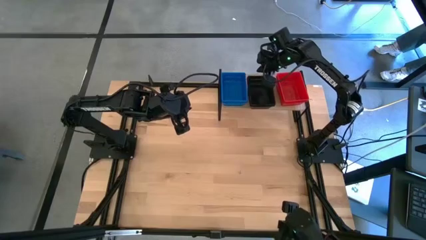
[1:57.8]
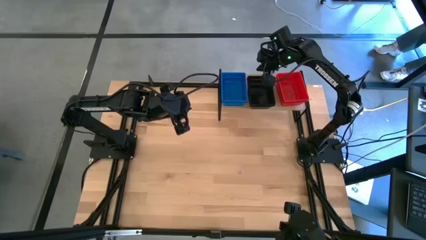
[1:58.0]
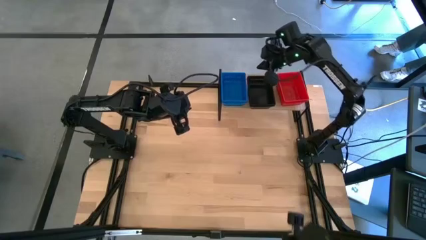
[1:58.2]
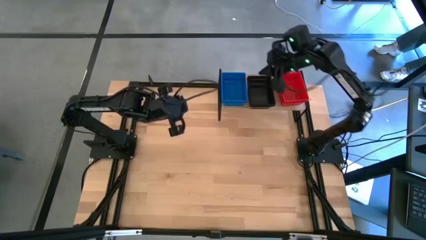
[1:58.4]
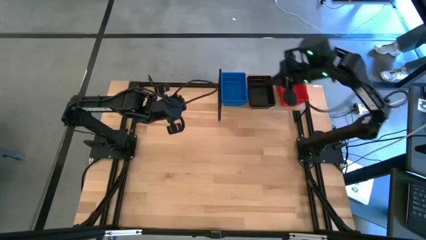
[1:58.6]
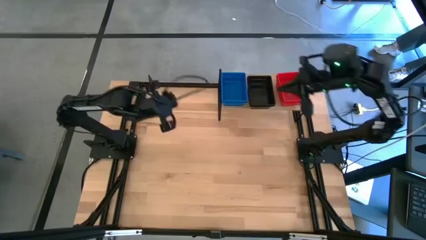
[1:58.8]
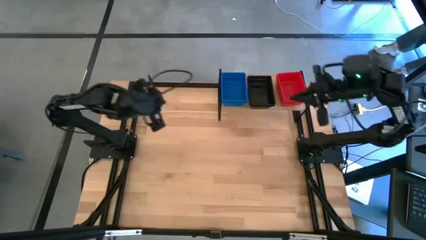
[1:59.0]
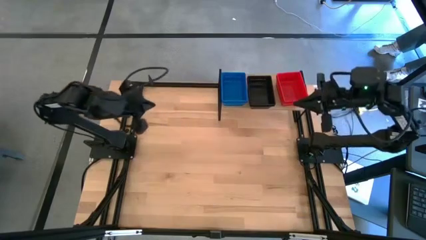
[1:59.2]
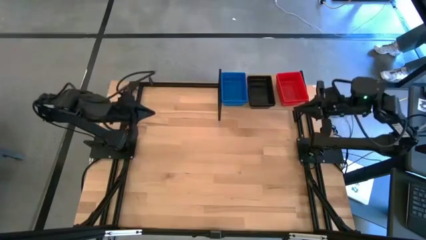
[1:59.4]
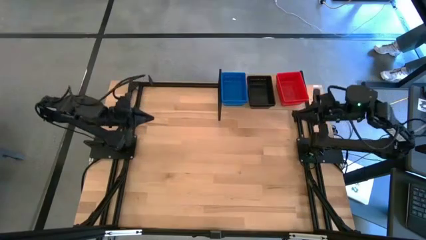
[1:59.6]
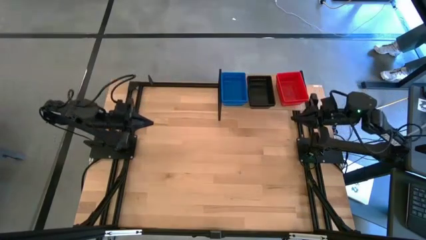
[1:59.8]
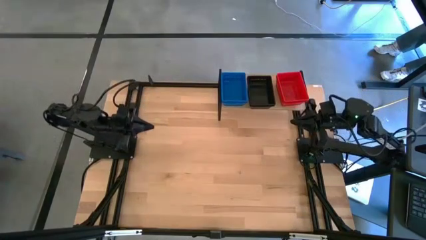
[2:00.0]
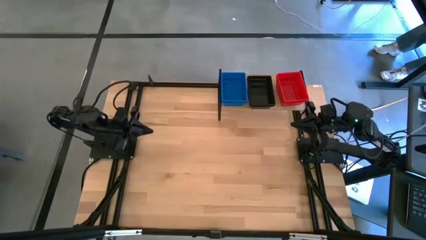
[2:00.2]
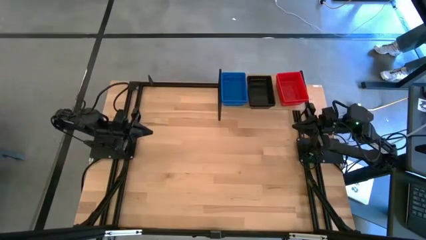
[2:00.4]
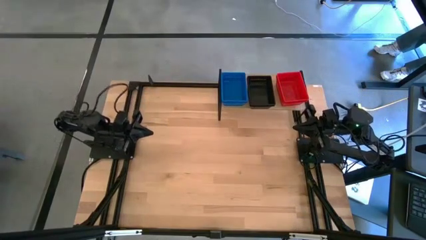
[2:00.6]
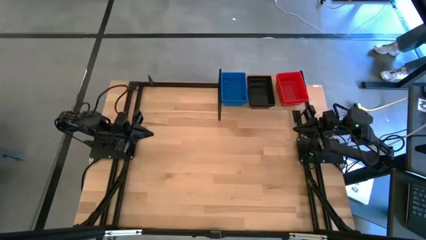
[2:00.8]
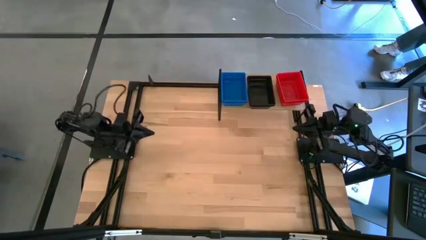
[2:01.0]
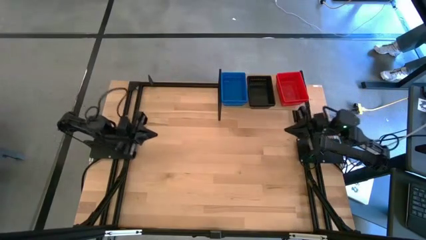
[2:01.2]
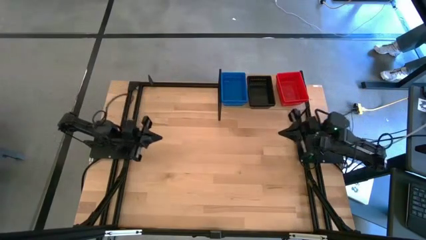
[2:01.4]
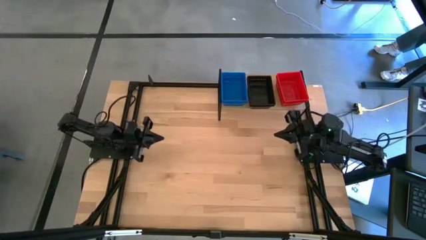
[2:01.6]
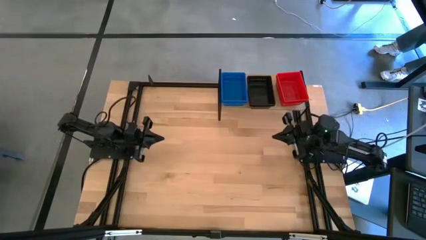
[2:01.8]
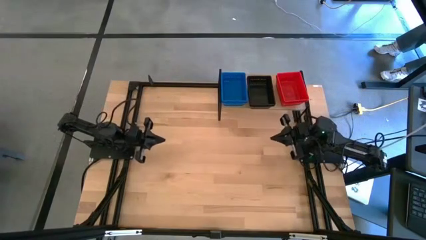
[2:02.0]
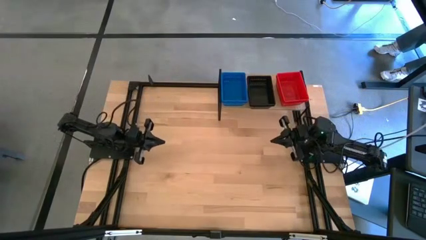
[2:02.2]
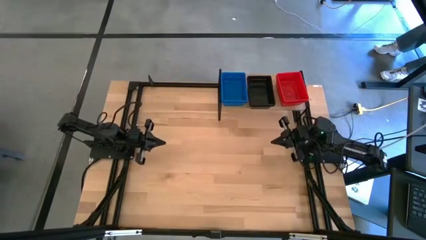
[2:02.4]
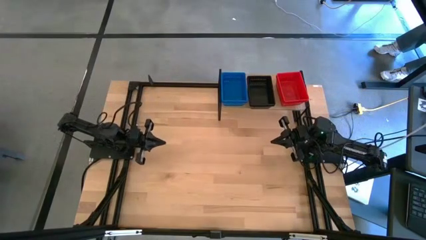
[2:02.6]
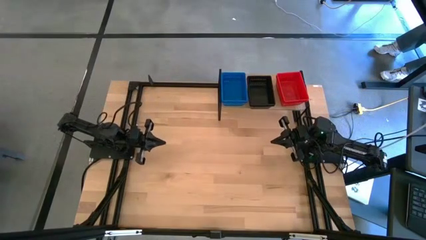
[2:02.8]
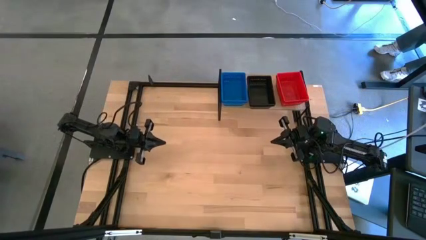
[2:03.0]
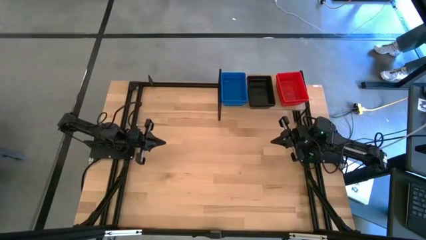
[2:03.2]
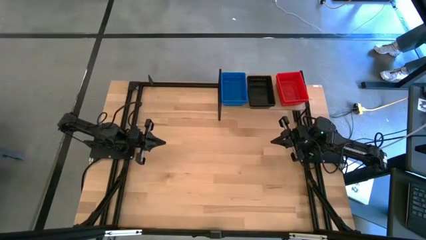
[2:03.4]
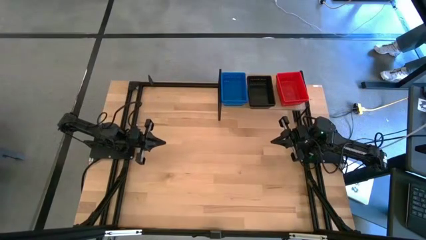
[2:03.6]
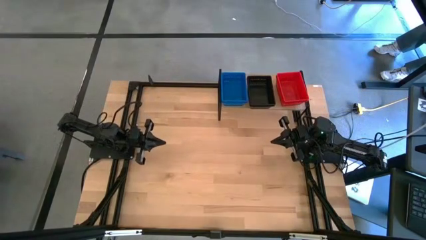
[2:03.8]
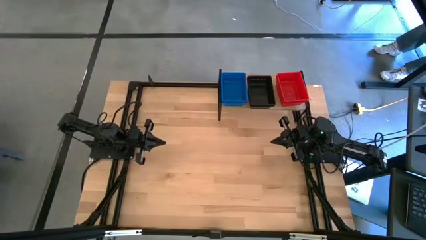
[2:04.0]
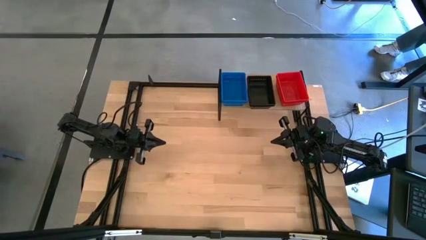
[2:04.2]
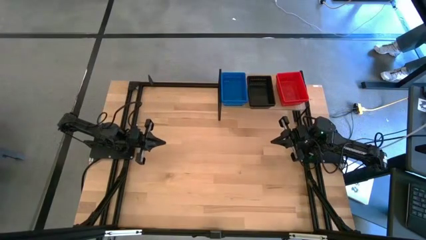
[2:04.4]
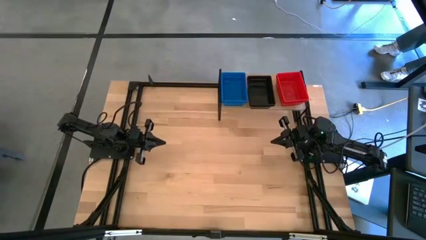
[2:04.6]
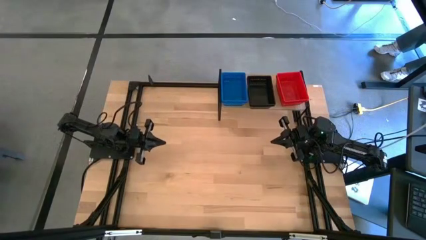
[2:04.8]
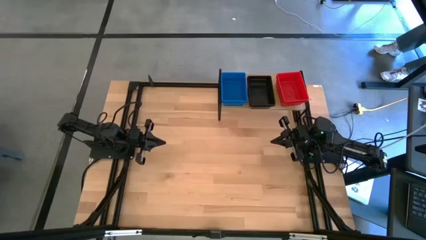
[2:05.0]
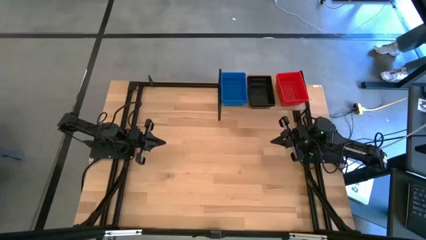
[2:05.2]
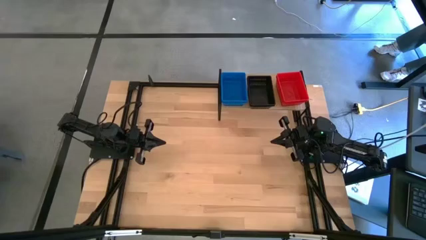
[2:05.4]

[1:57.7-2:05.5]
Task: Stack baskets on shelf by color
Return to Home Position

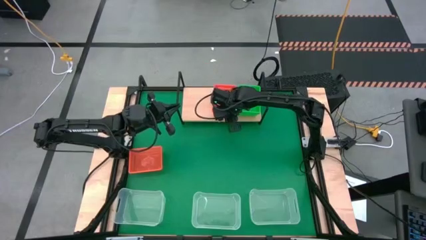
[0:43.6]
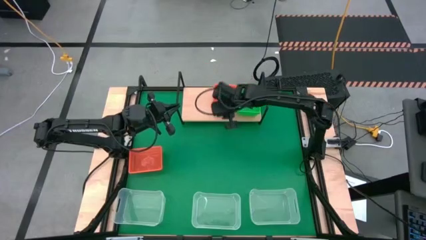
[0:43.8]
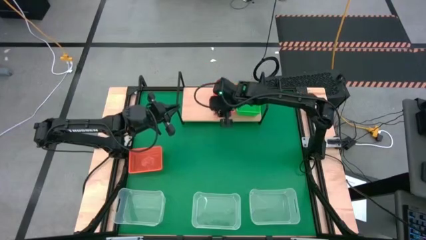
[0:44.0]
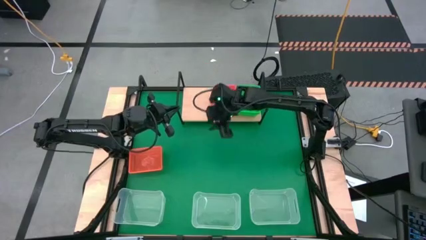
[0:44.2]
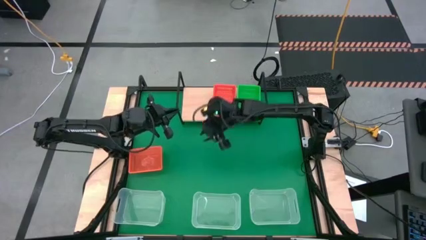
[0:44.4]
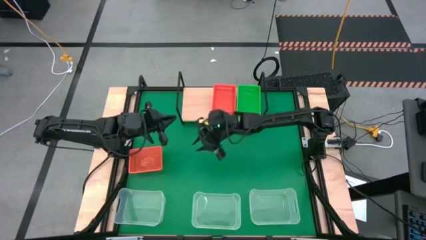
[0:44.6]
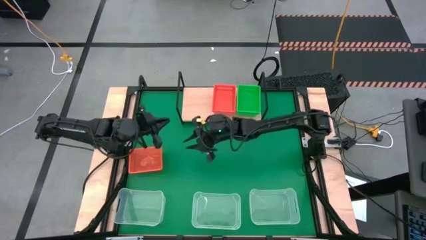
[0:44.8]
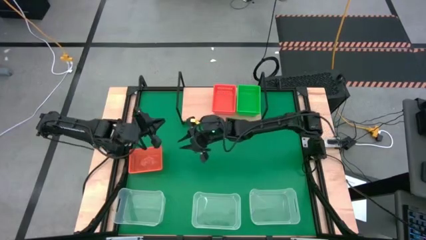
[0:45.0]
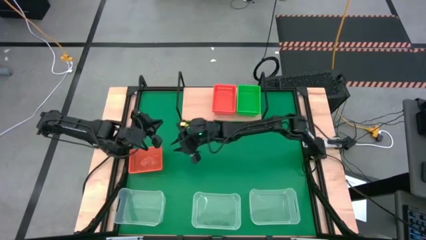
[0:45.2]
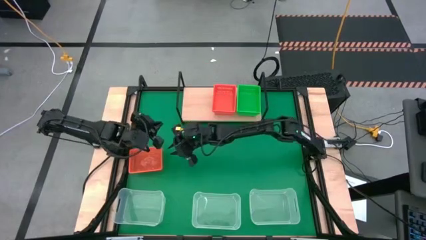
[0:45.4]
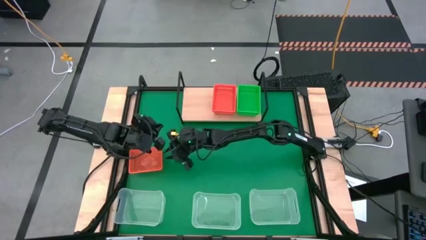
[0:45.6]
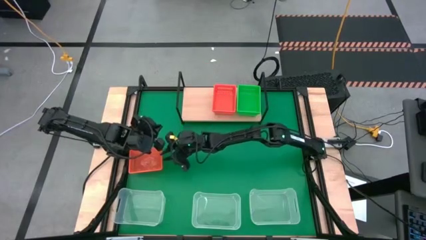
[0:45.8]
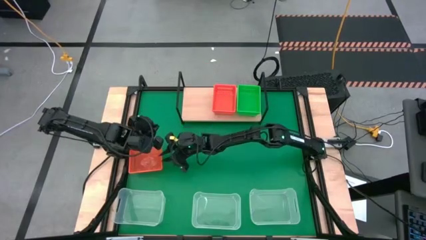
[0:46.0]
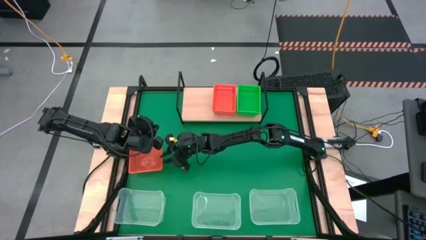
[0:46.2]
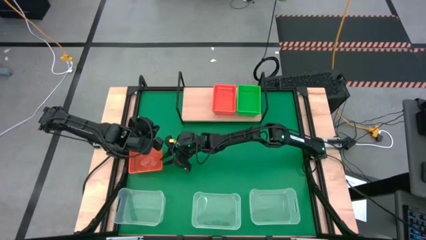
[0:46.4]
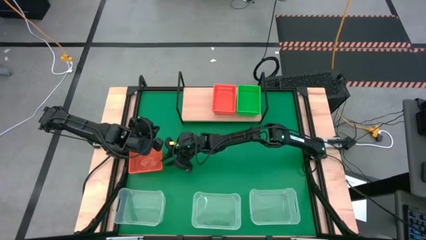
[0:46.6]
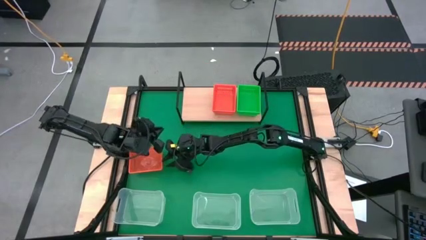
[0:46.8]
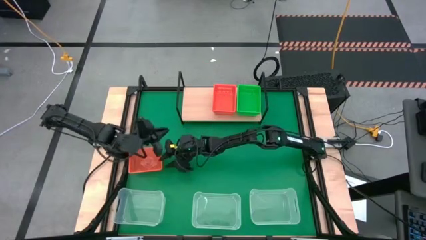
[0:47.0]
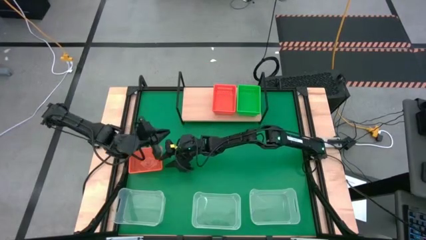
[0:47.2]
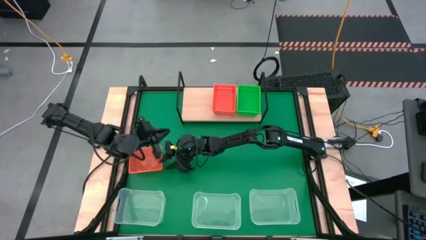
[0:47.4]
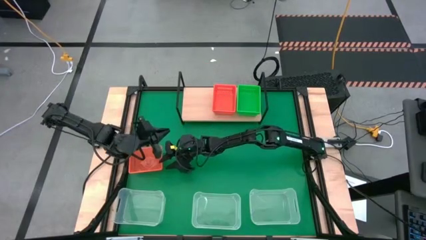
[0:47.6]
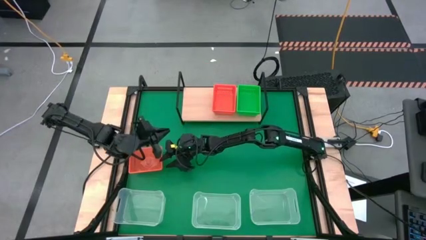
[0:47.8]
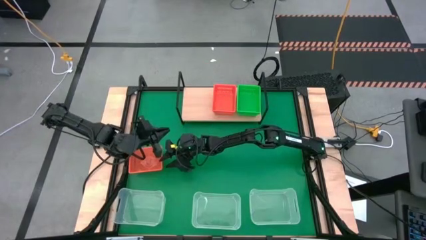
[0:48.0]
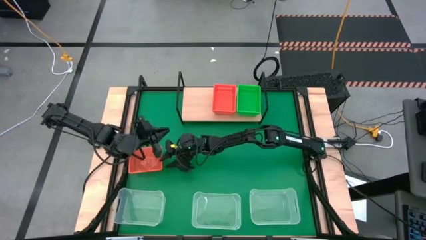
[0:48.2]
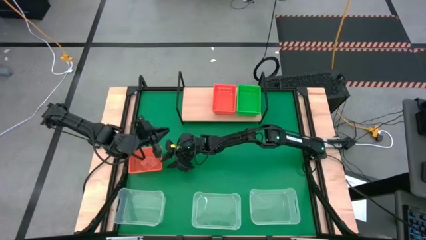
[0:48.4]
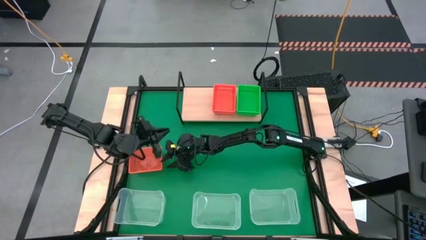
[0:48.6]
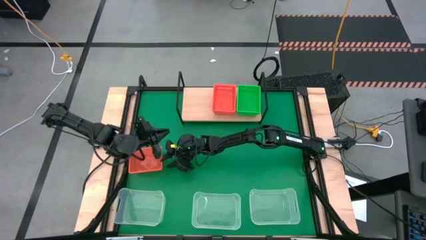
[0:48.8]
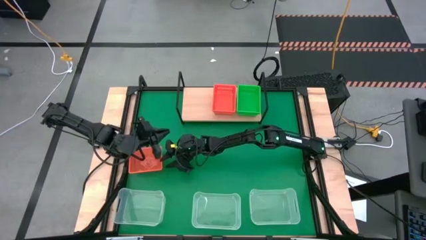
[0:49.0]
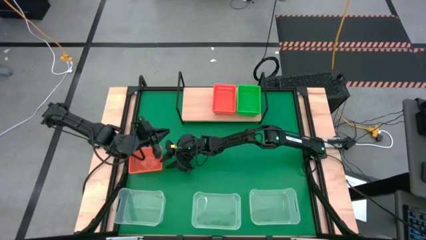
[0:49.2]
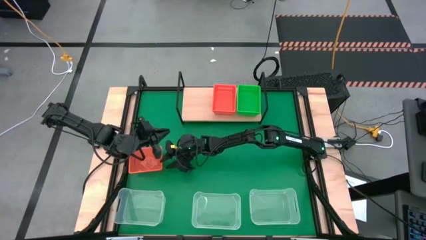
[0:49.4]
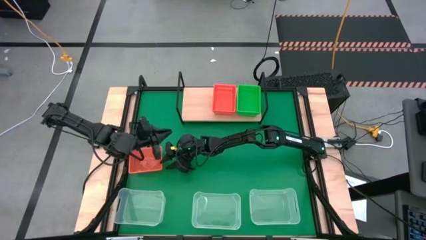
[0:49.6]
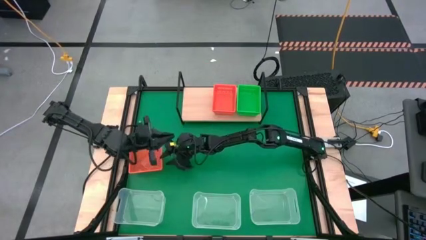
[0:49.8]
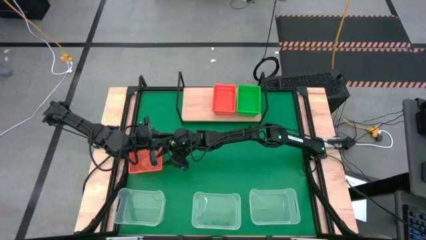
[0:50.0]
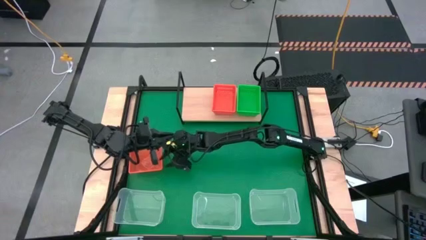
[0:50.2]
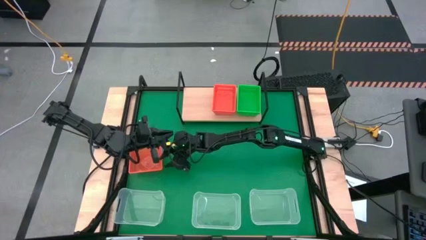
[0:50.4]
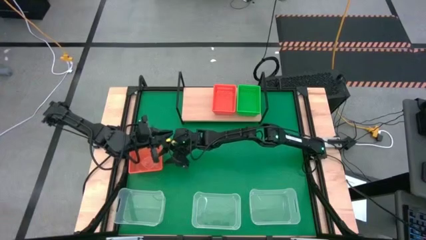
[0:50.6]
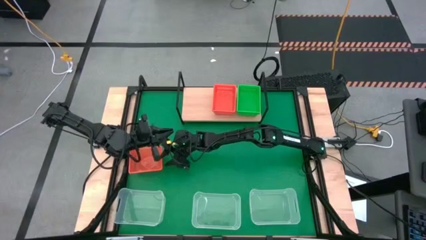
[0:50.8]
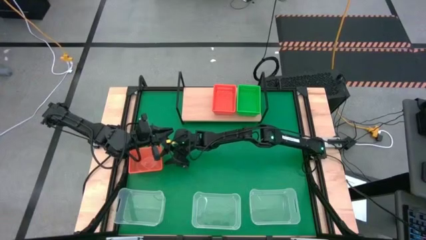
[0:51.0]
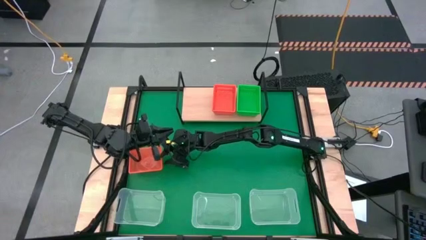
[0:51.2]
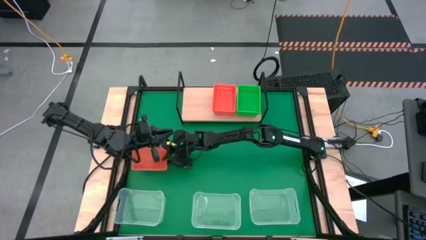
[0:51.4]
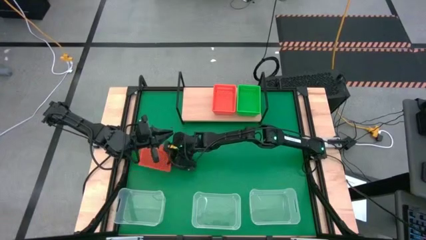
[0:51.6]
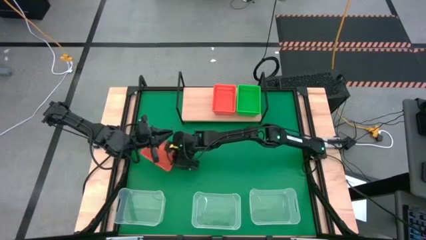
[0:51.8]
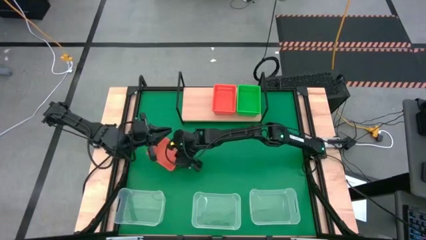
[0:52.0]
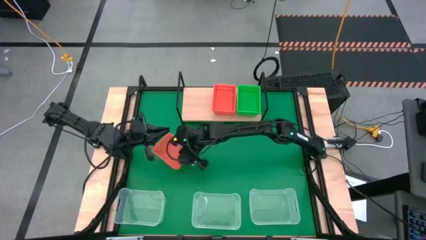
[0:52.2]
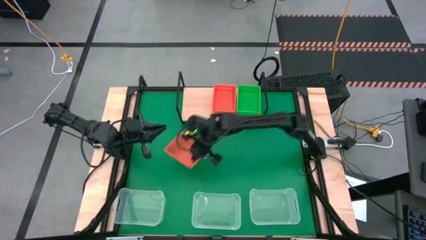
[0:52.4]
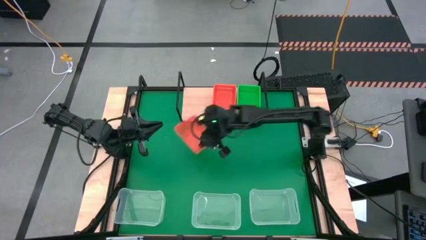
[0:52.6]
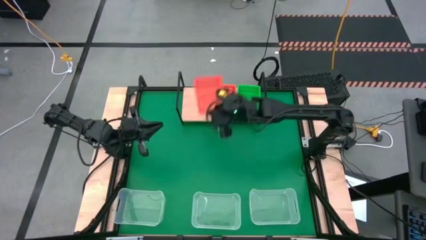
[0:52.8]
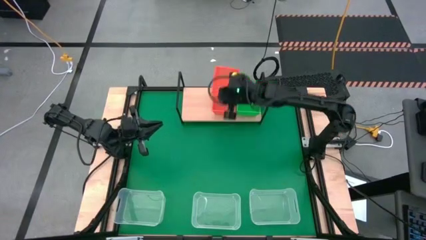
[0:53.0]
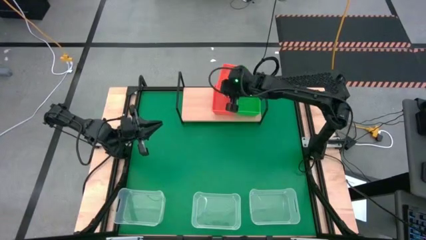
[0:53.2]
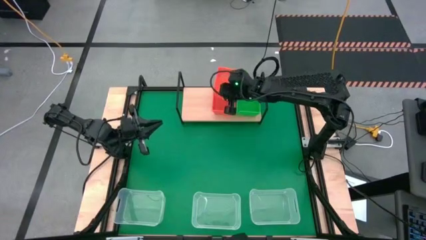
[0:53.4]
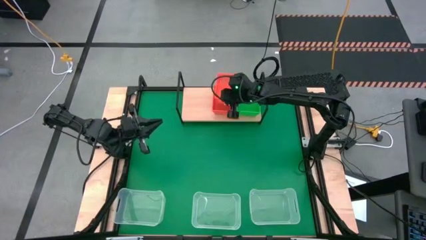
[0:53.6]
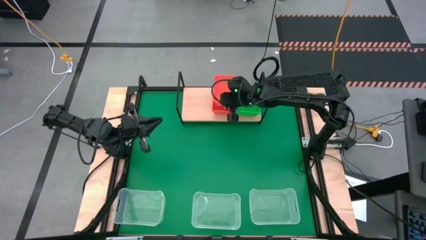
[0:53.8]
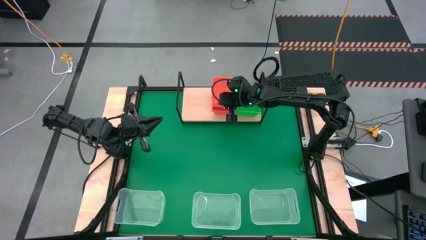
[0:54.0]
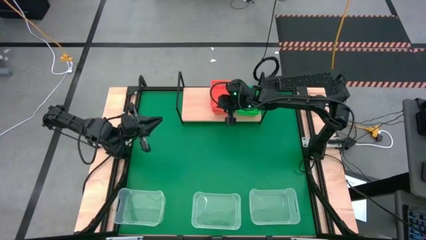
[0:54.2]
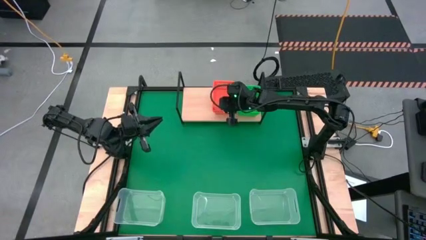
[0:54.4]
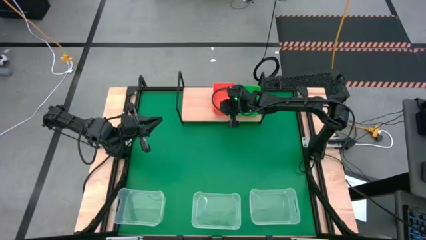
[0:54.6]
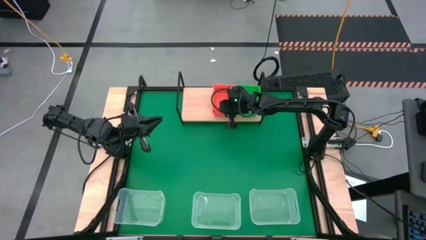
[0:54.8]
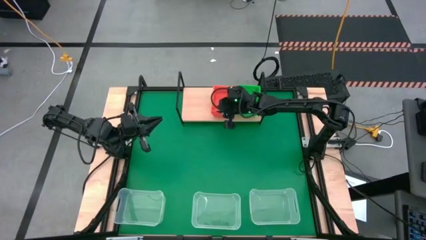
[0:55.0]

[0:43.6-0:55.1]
Task: Stack baskets on shelf by color
Stack the orange bin on the orange bins on the shelf
